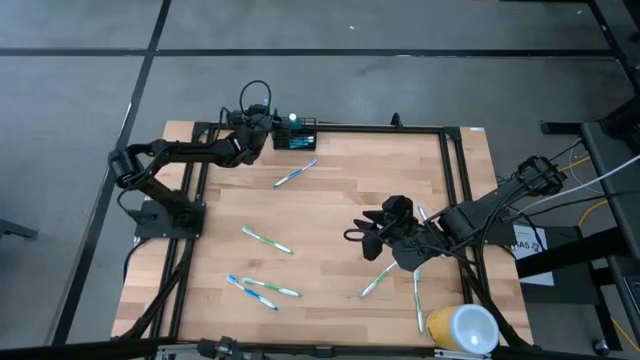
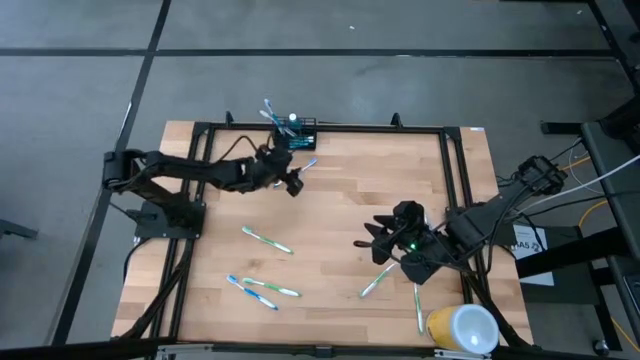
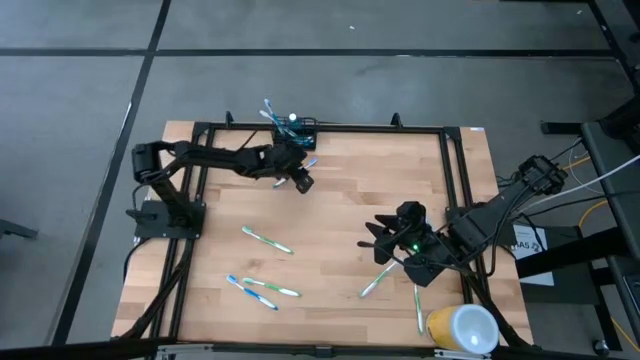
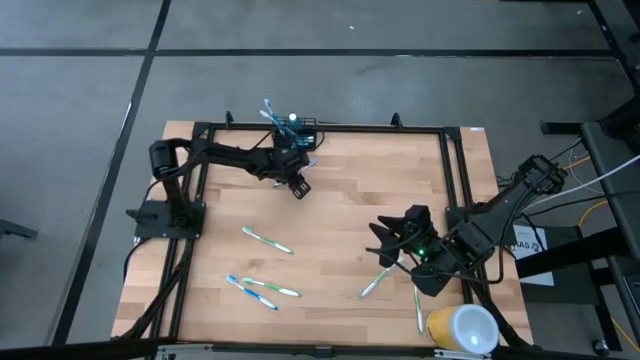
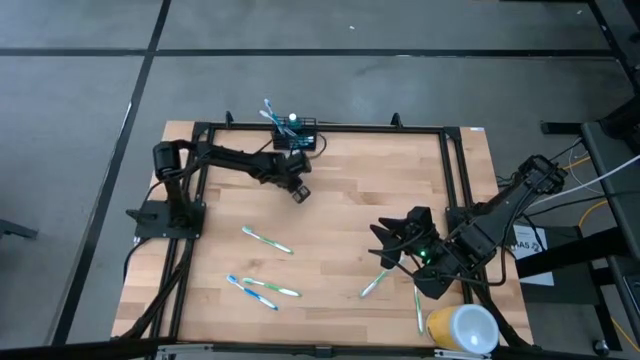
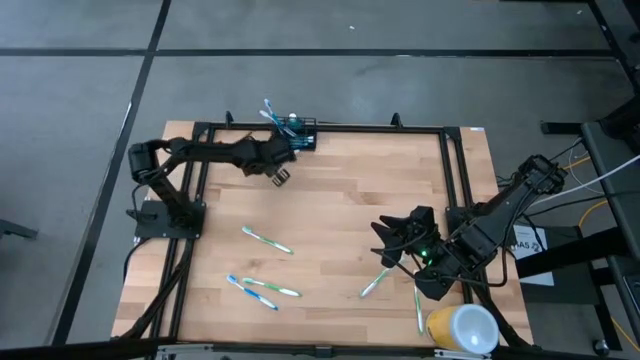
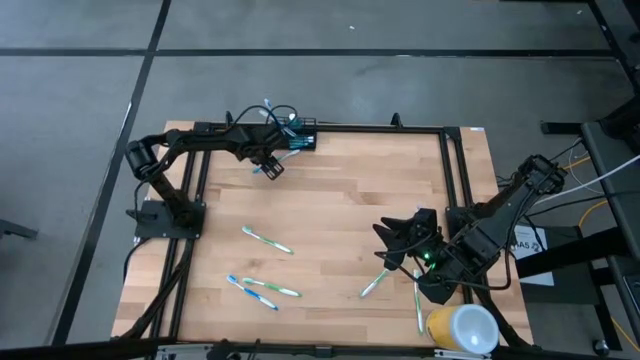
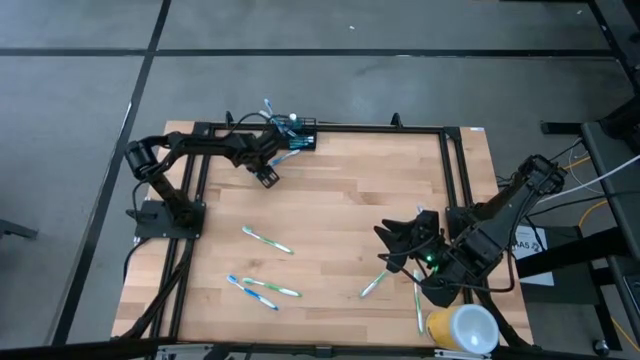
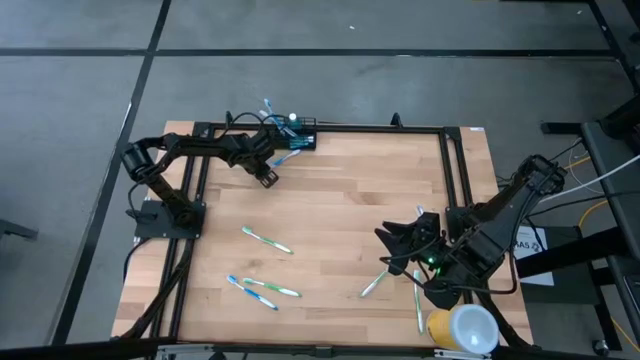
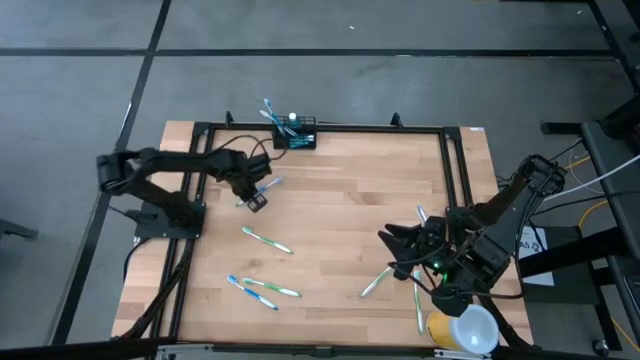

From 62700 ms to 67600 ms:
Task: Pick & Place toothbrushing station
Put the blue toothbrush into the black wire organizer

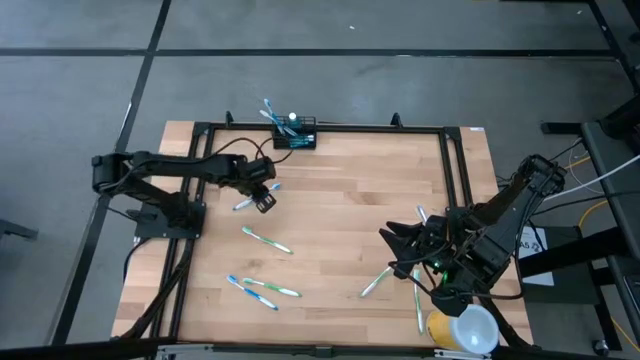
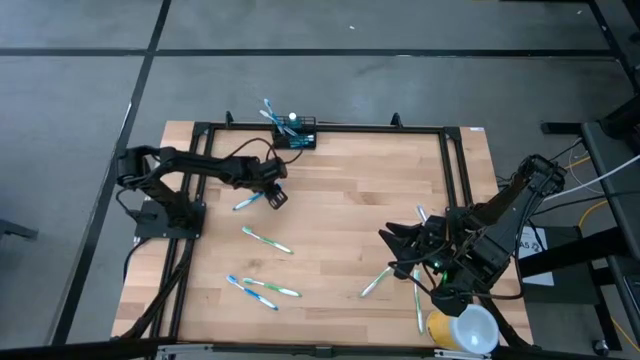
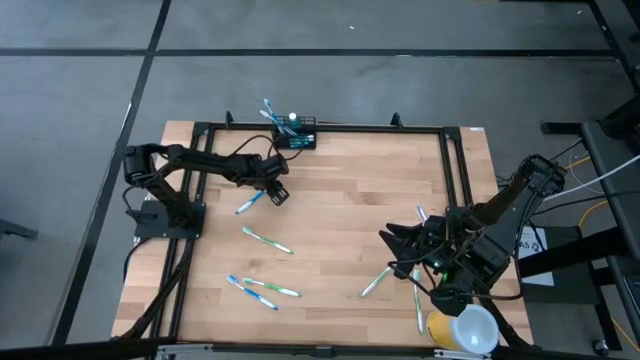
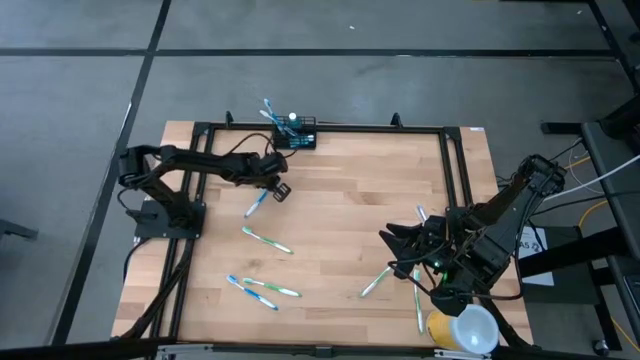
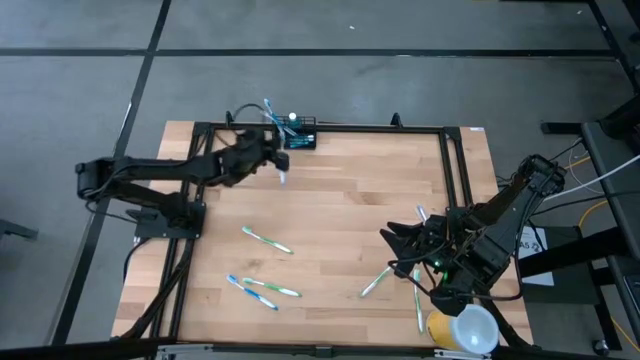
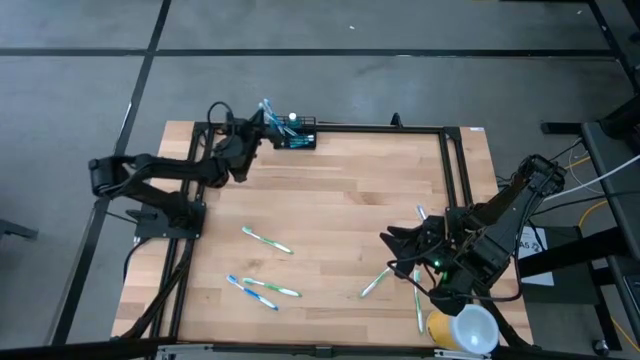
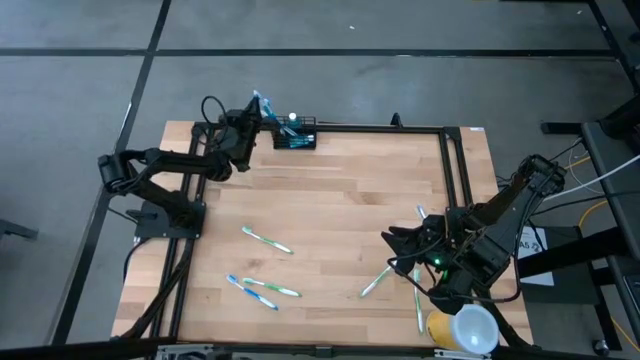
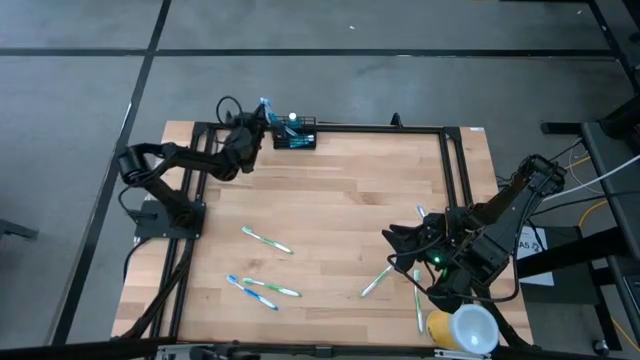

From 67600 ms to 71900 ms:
Put the blue toothbrush into the black wire organizer

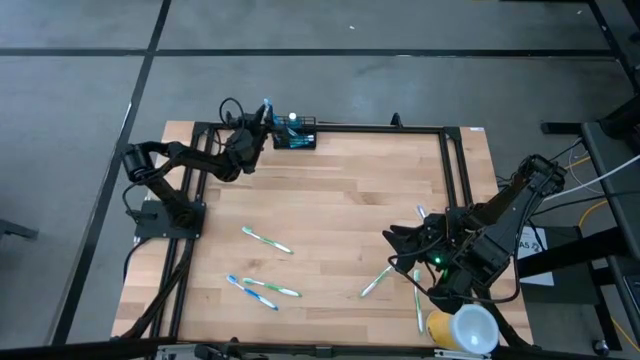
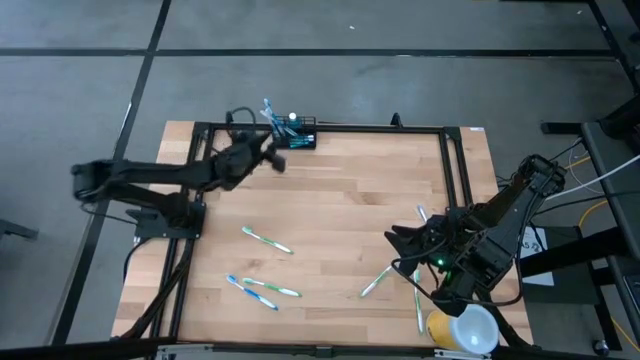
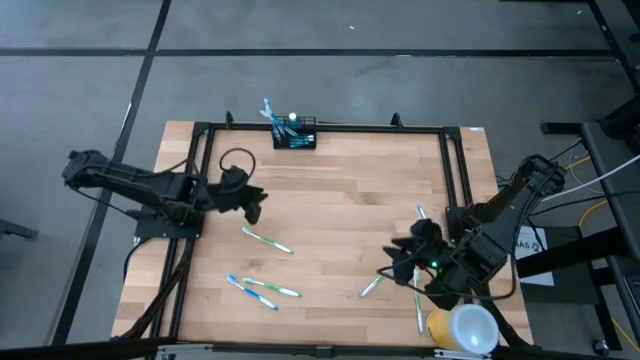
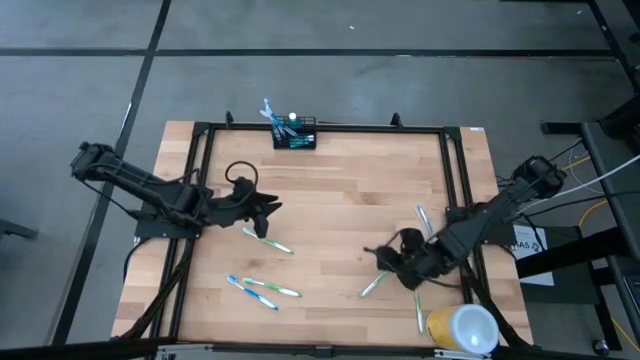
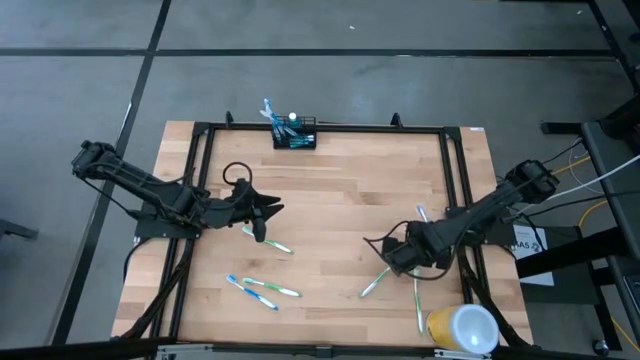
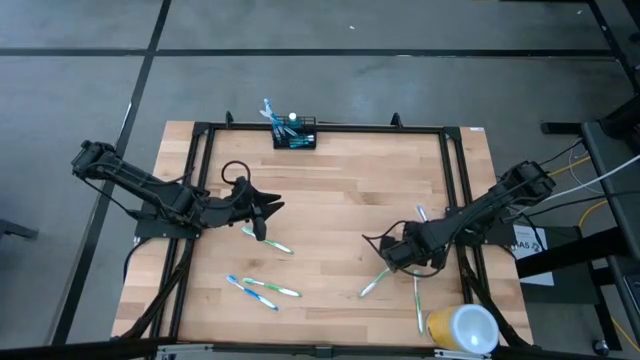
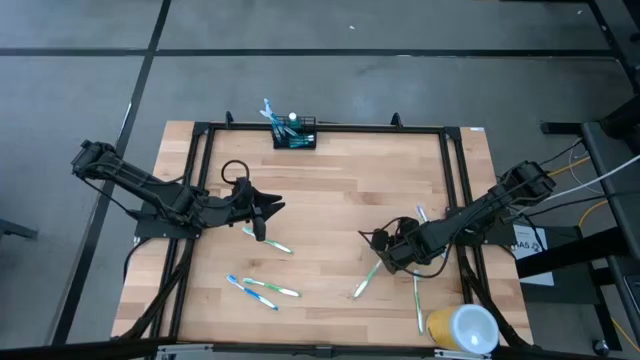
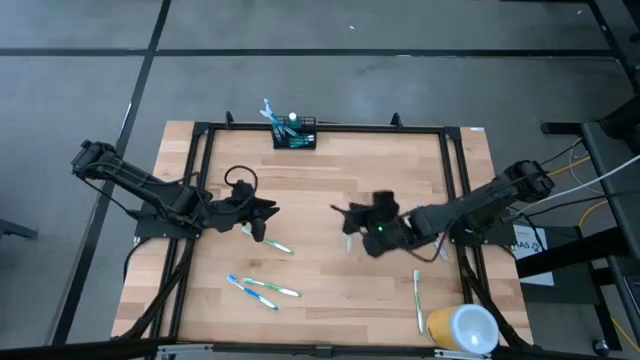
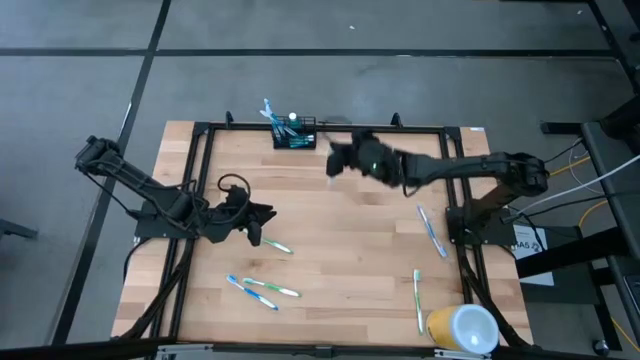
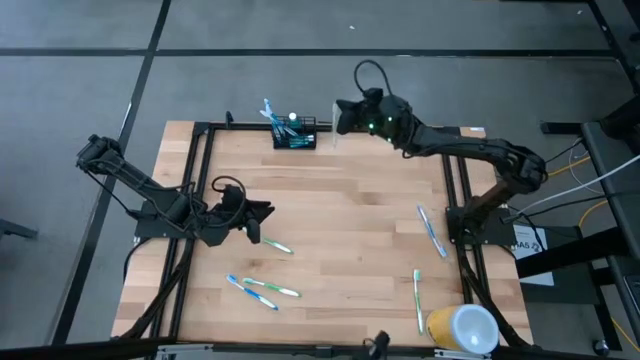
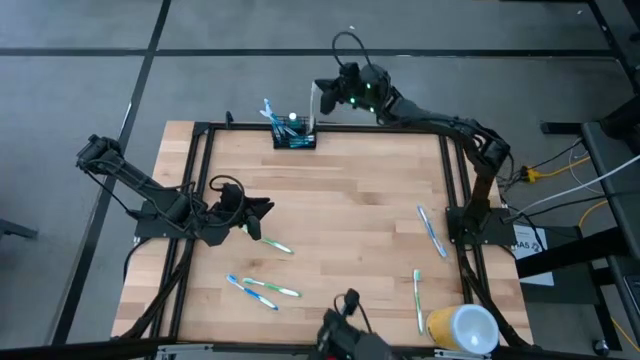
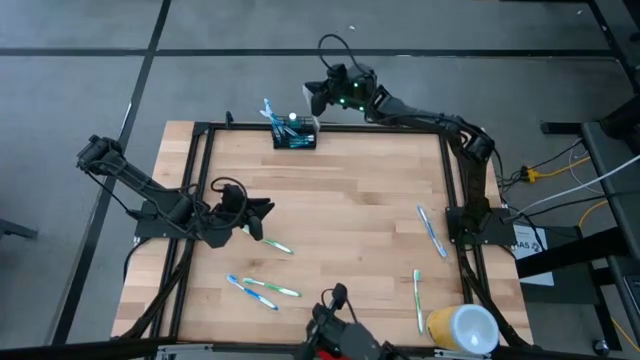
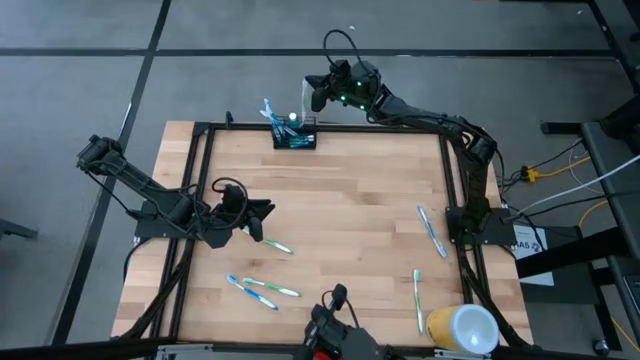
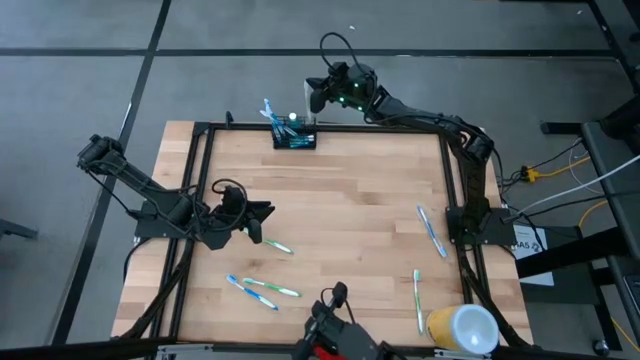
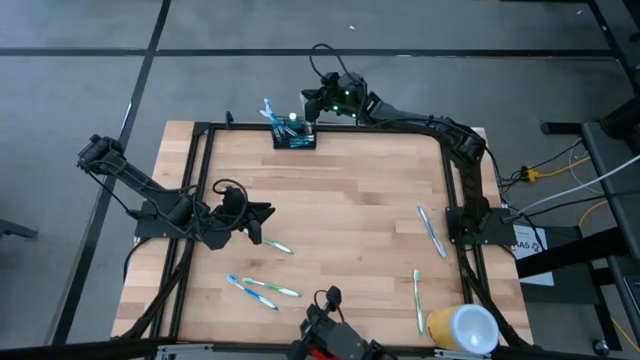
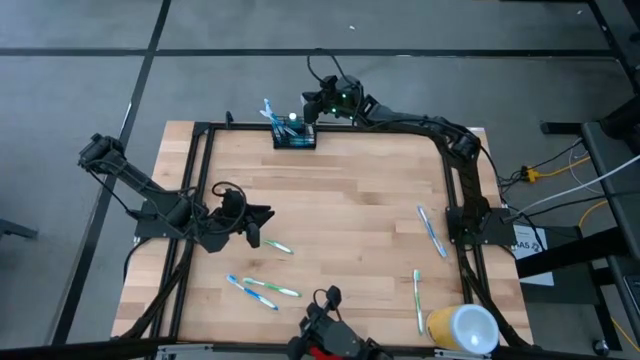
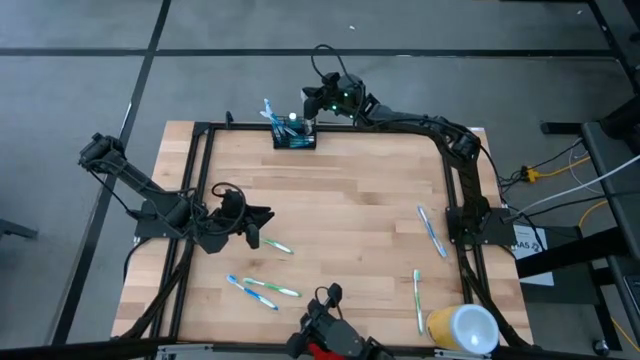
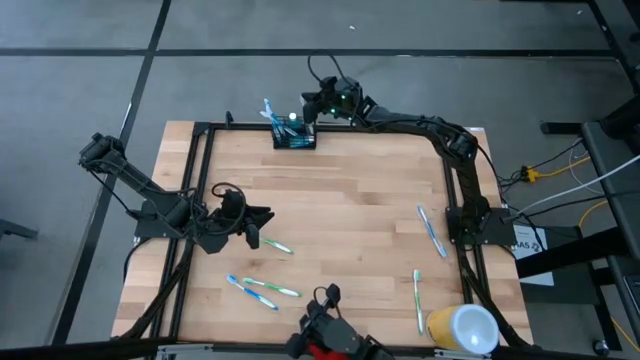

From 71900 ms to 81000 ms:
Put the green toothbrush into the black wire organizer

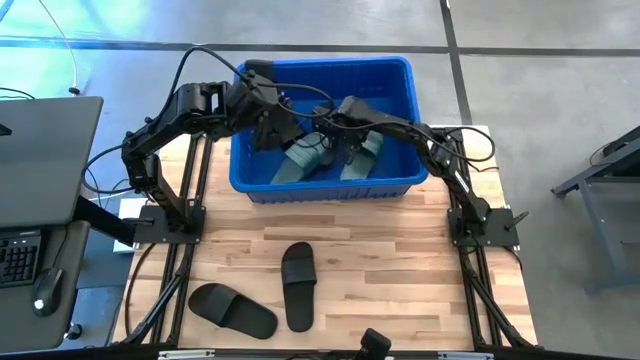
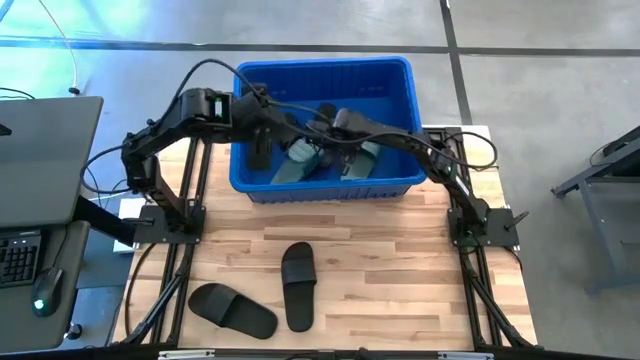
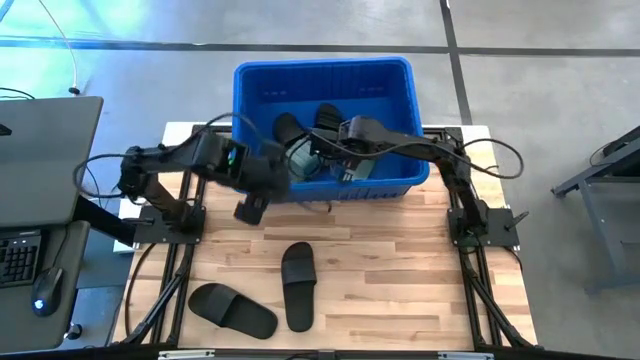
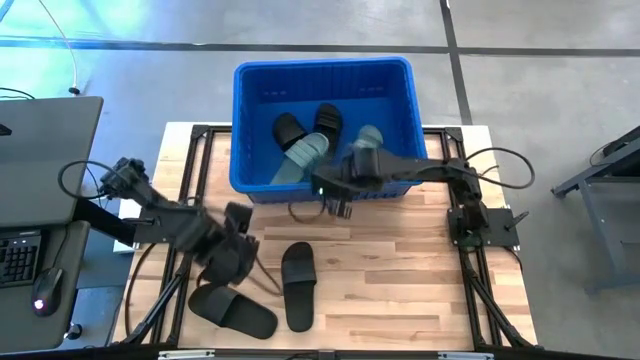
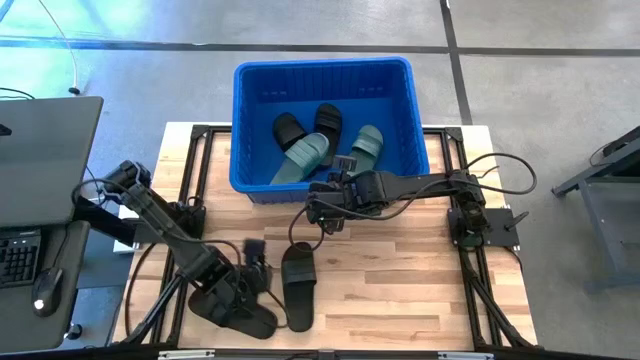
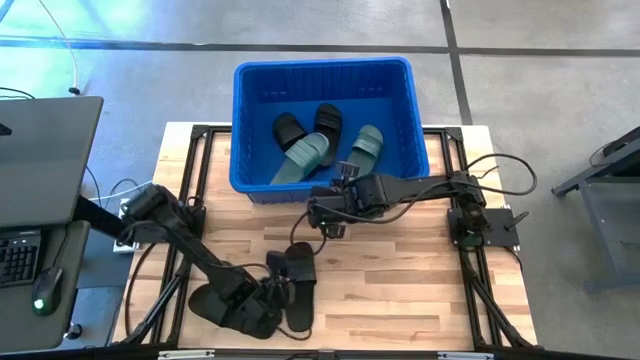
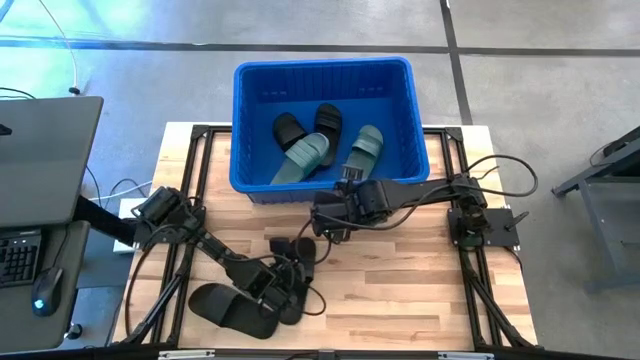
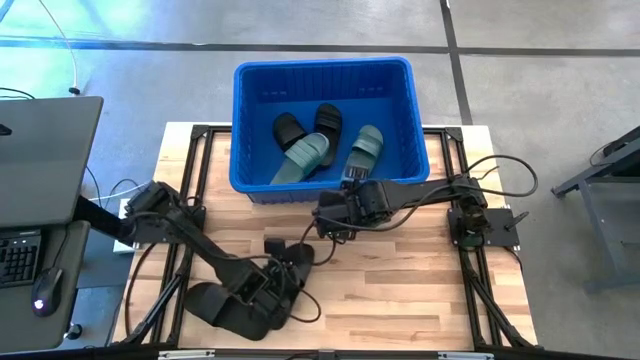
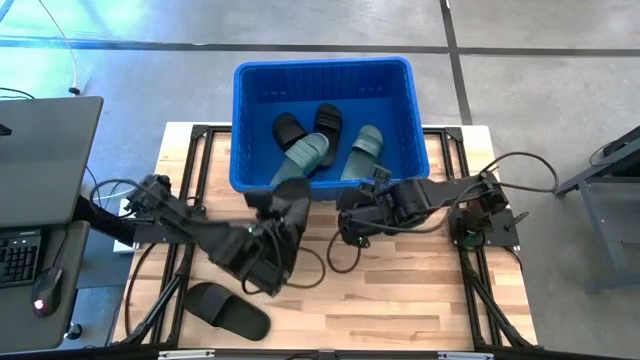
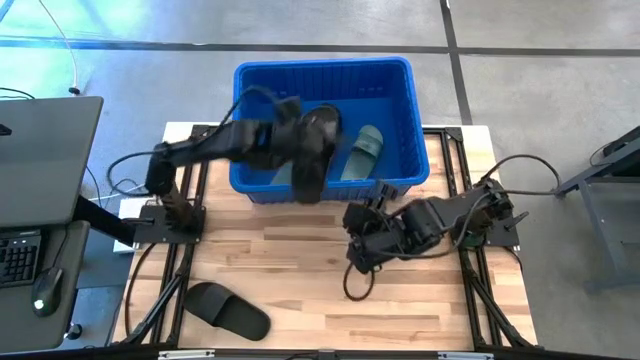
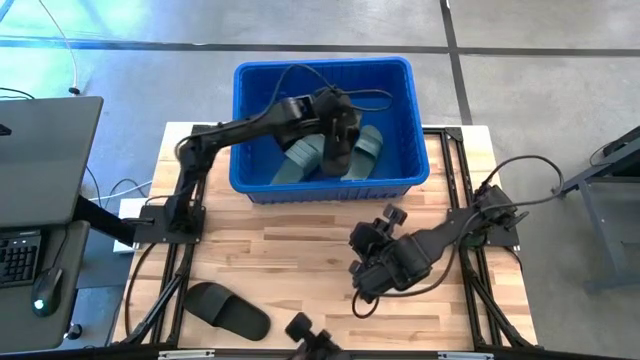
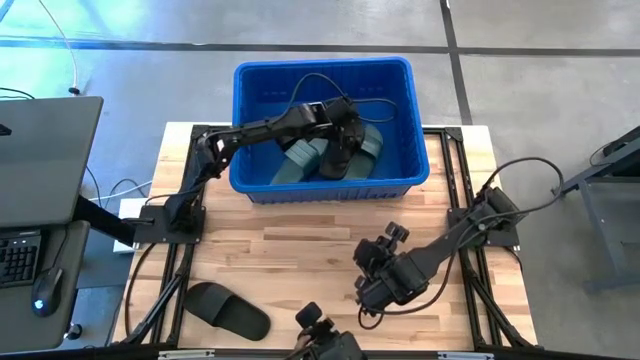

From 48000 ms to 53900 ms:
Task: Pick and place slides into bin
Put the black slide into the blue bin
